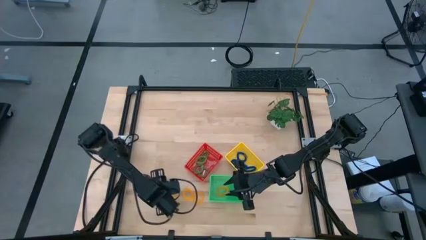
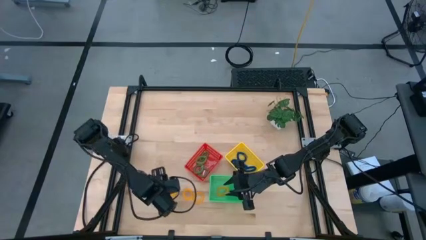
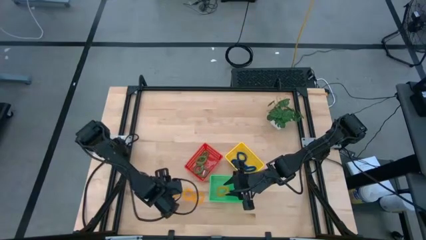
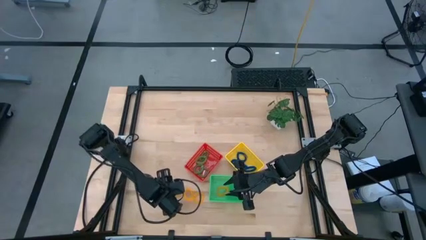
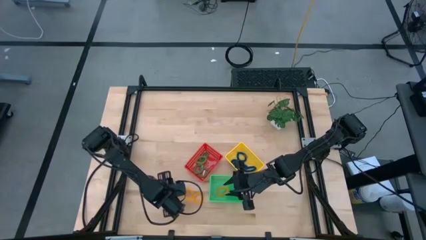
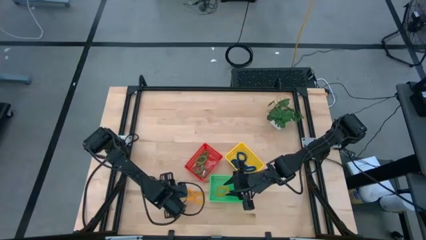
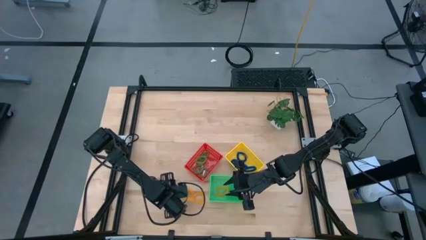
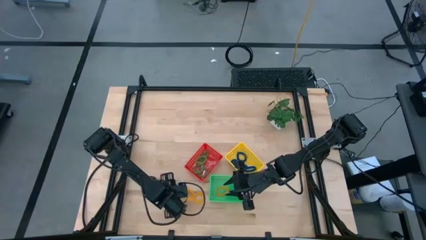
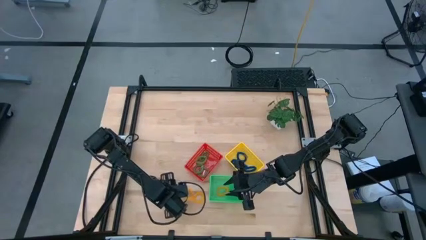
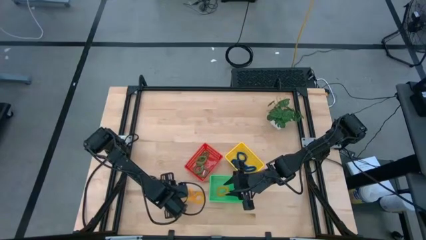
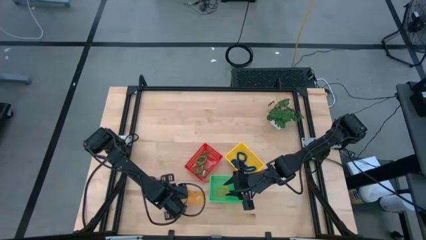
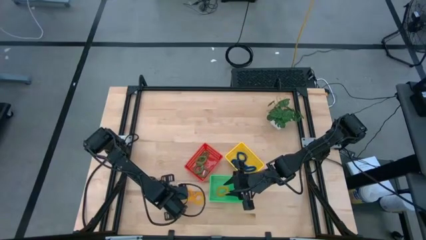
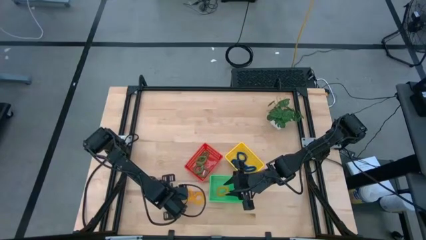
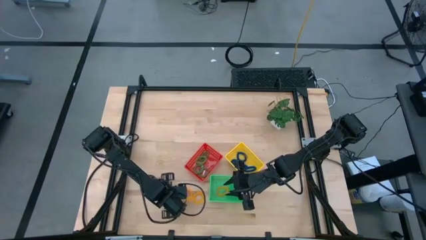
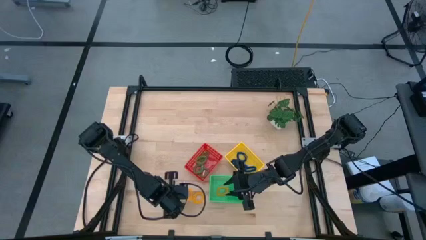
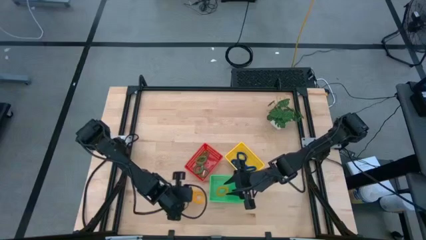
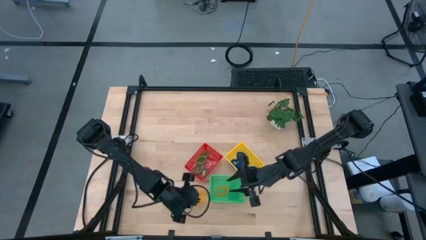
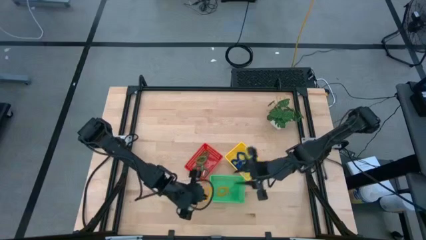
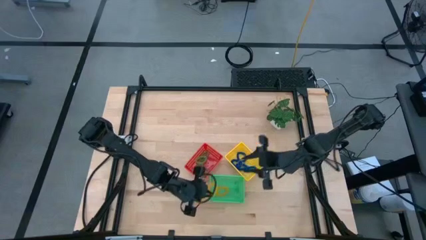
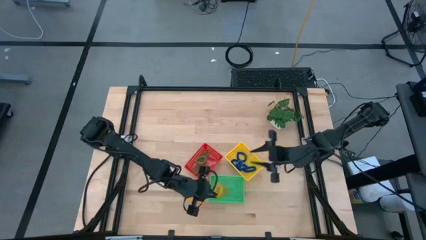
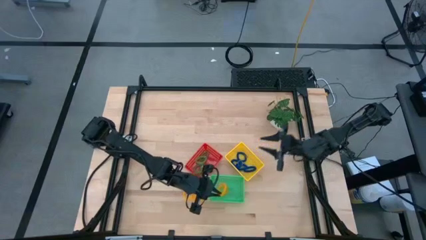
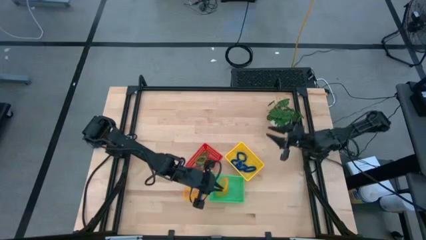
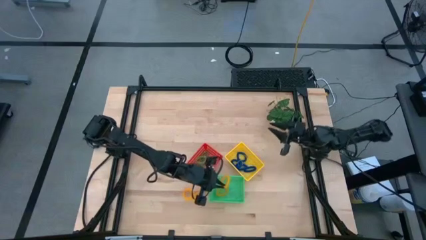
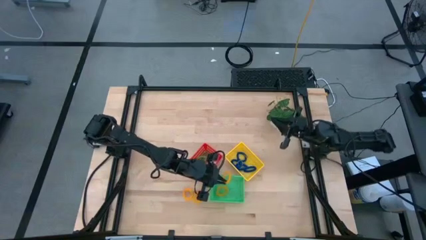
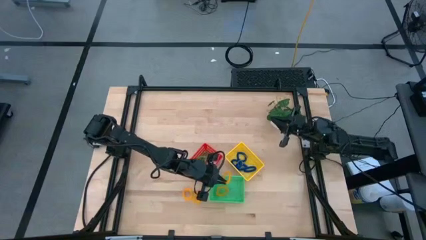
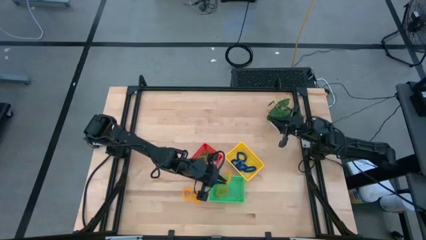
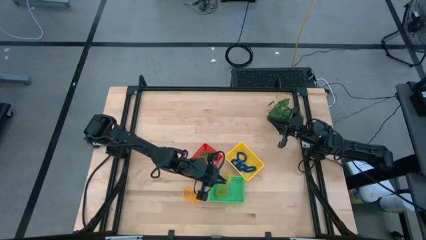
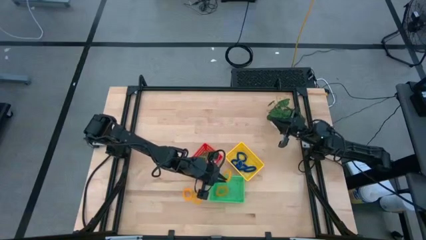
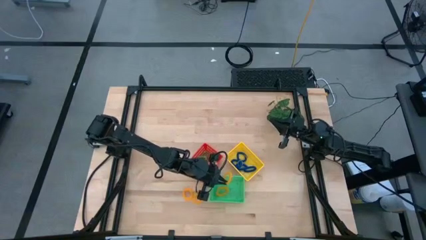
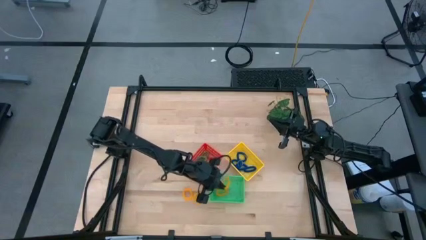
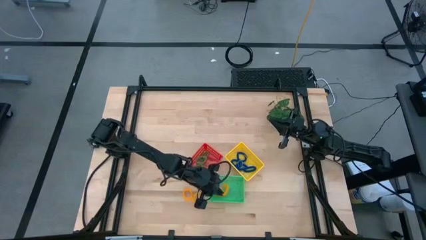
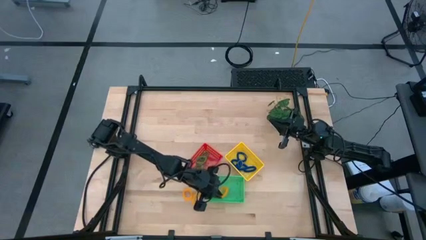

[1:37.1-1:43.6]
Task: Sort spring keychains
Put the yellow spring keychain into the green bin

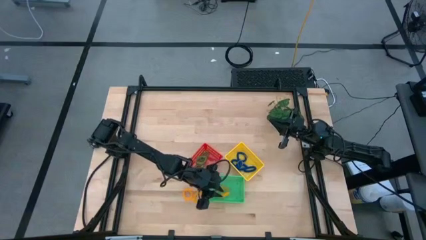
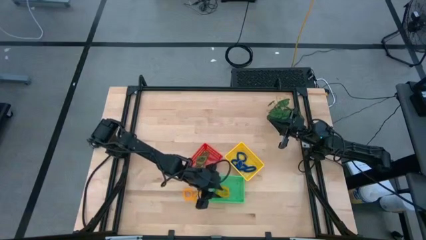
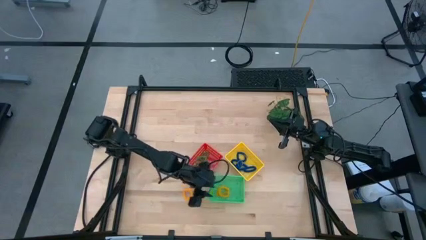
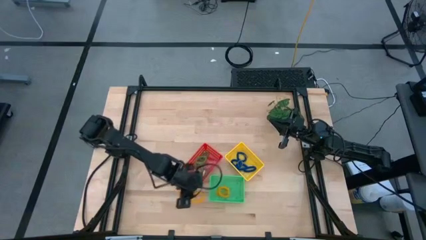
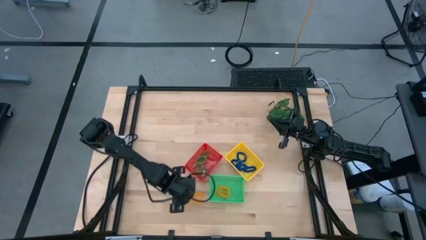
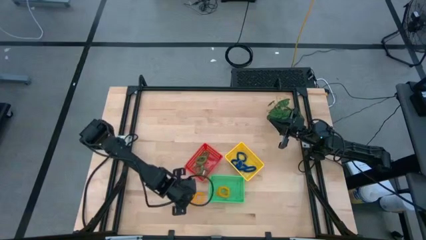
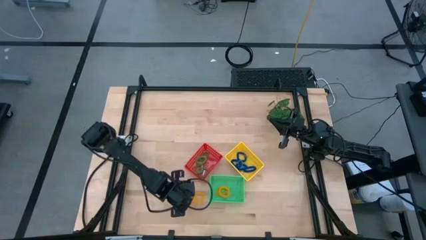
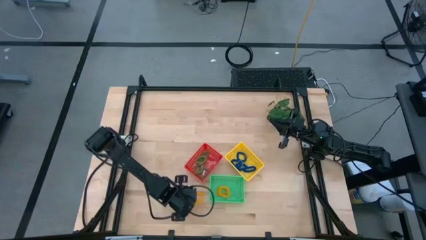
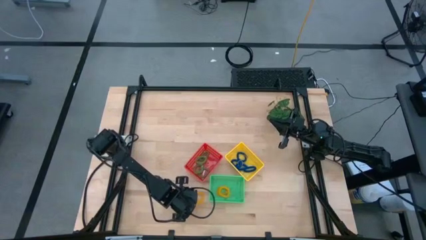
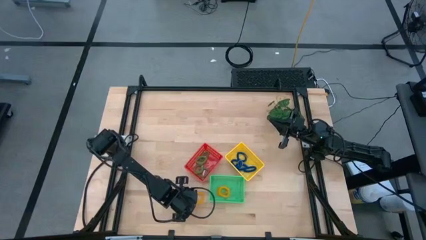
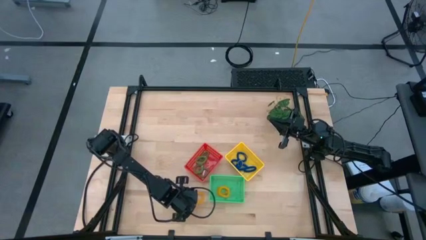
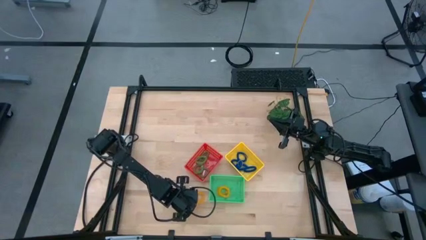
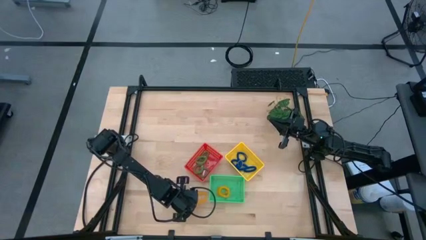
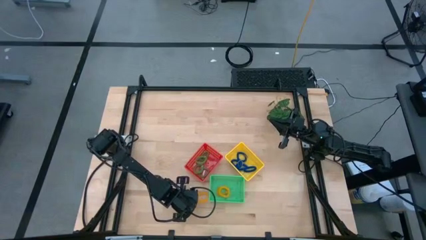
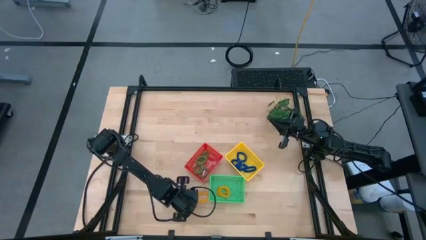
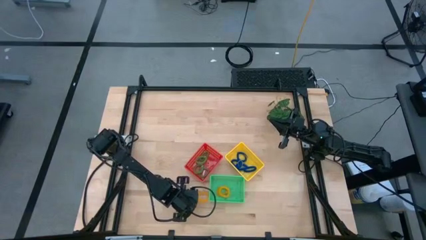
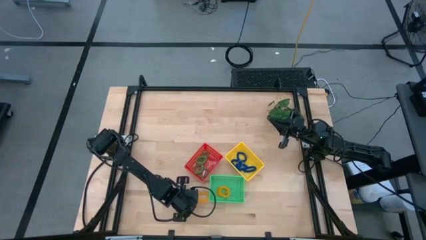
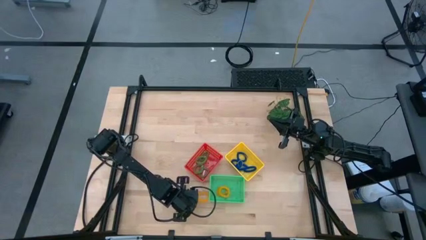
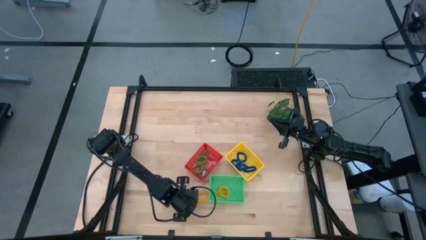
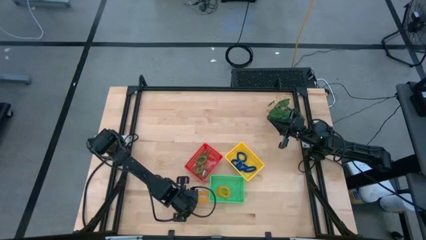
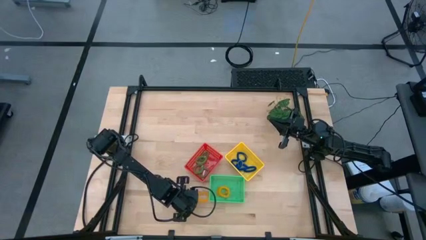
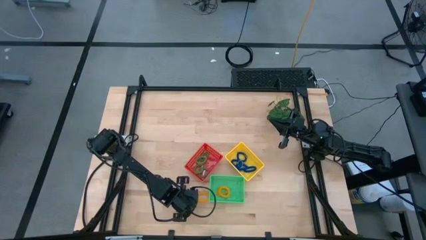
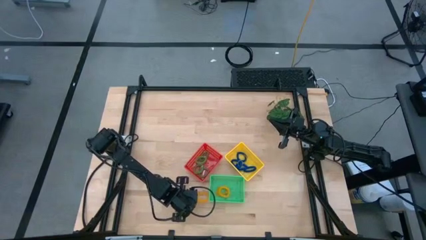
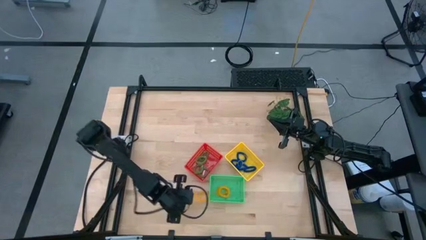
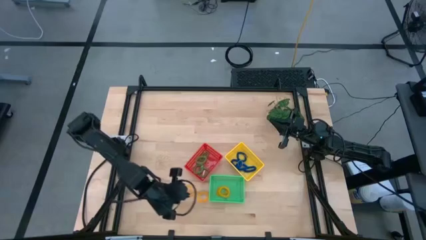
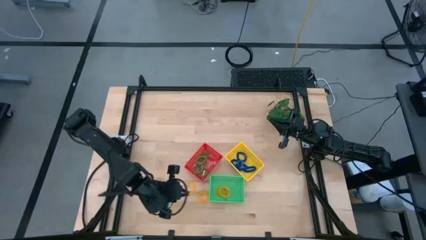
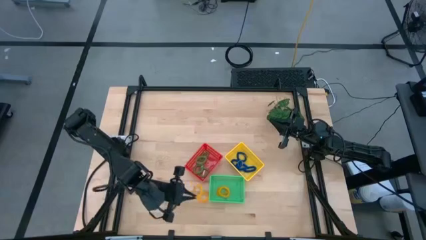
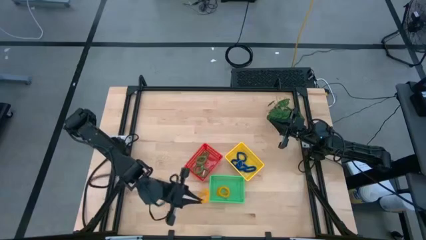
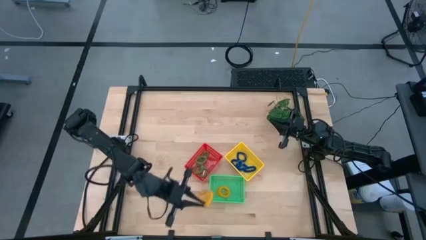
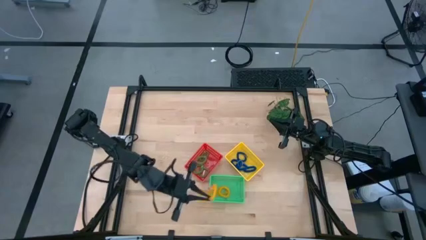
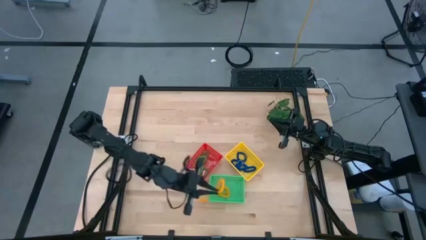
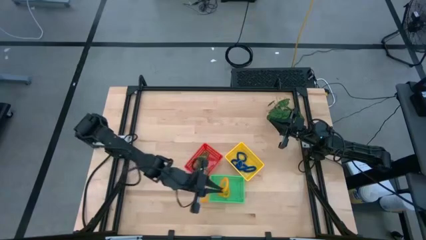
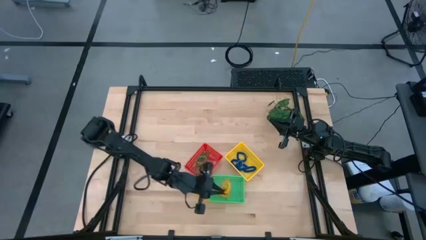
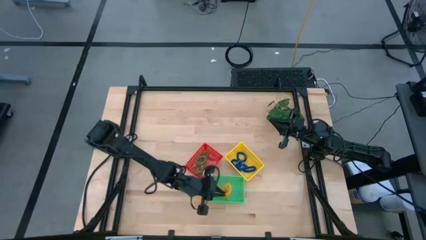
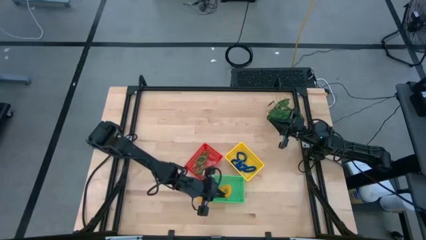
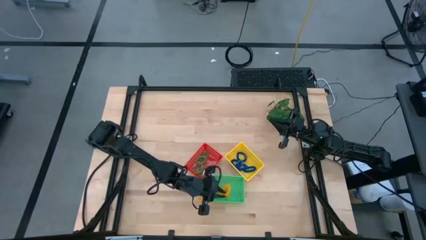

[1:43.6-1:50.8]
Put the yellow spring keychain into the green bin

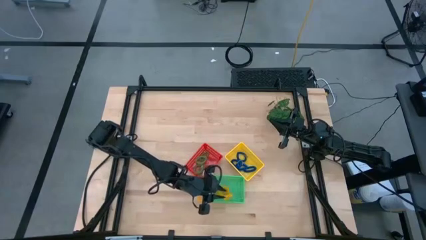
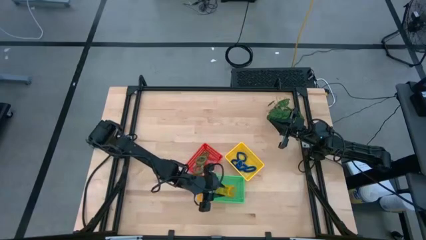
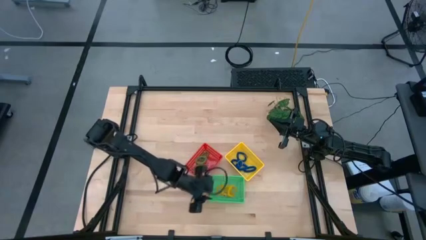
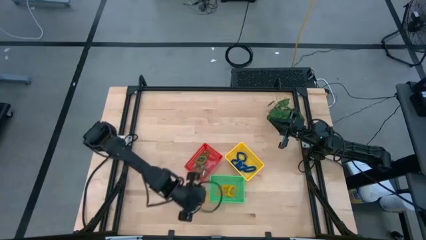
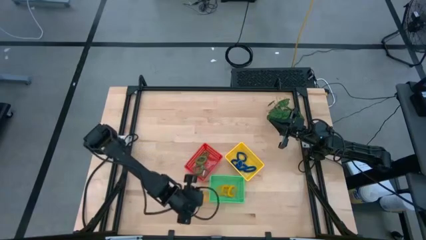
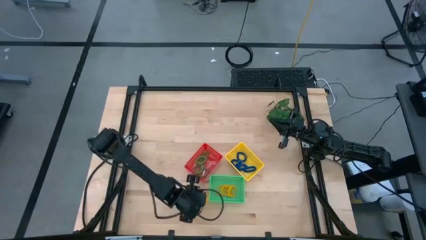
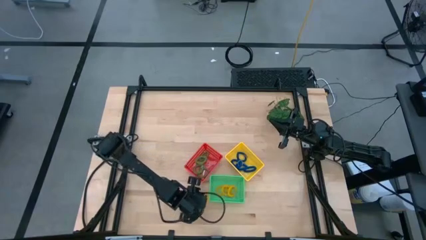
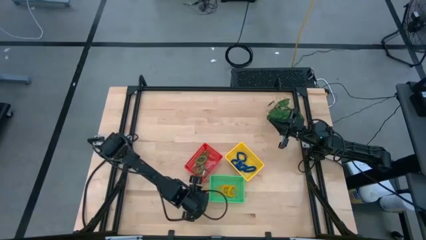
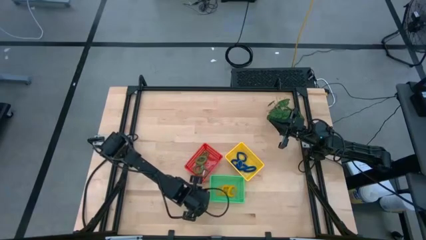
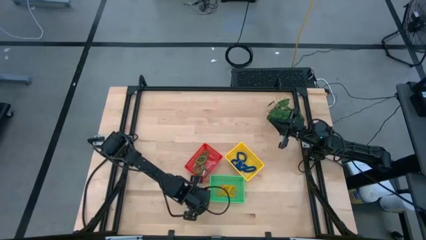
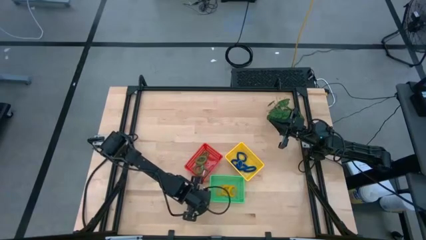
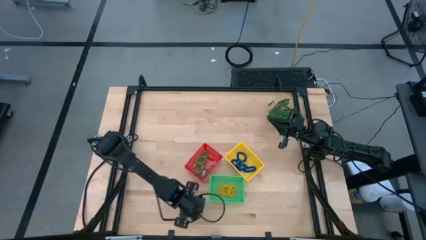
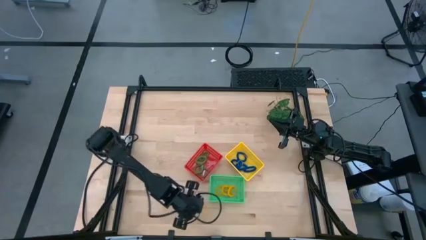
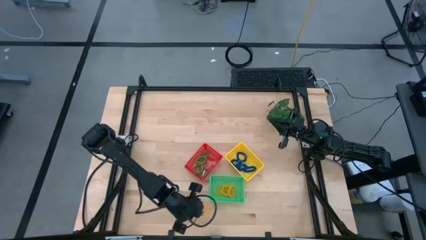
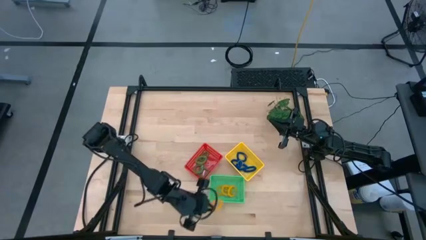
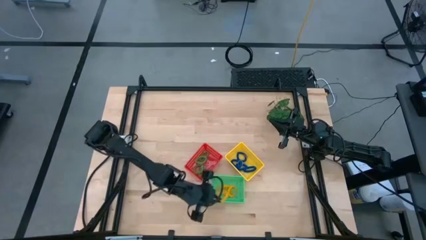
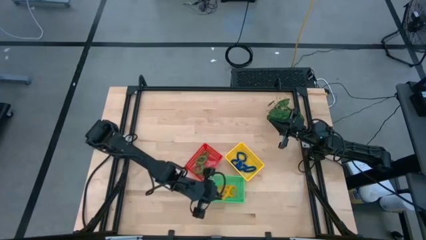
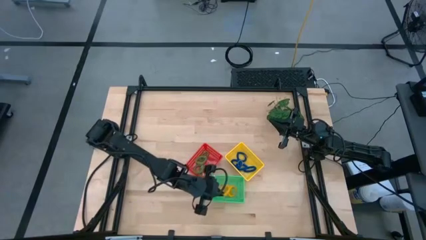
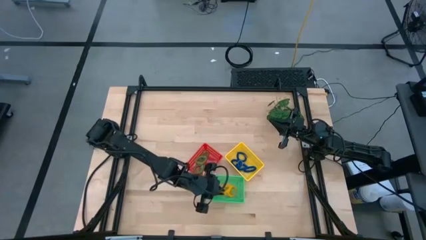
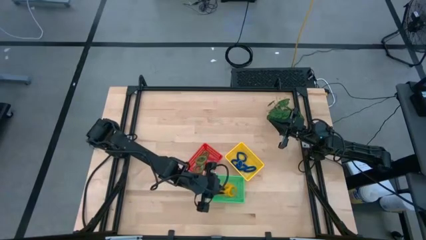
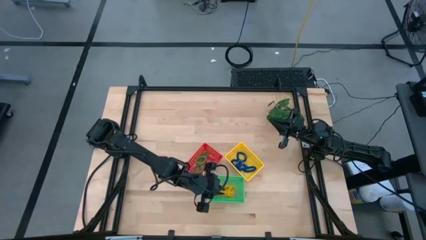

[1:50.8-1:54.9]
Put the yellow spring keychain into the green bin
